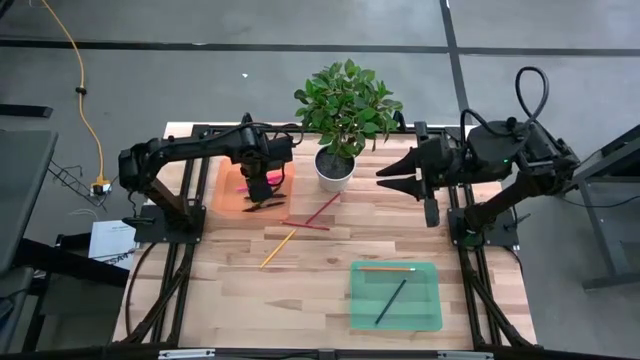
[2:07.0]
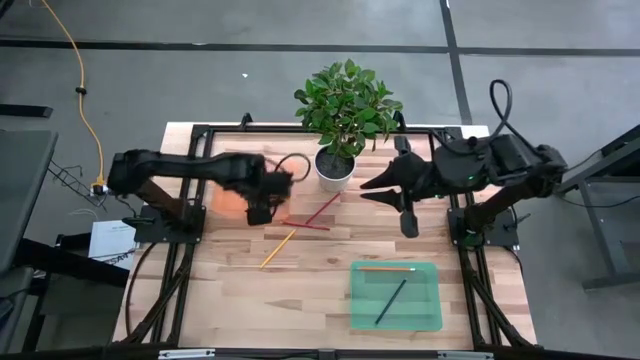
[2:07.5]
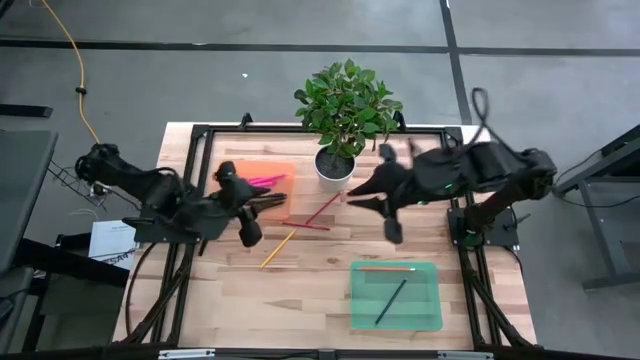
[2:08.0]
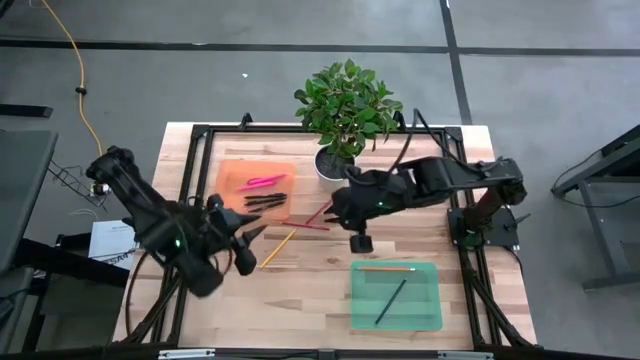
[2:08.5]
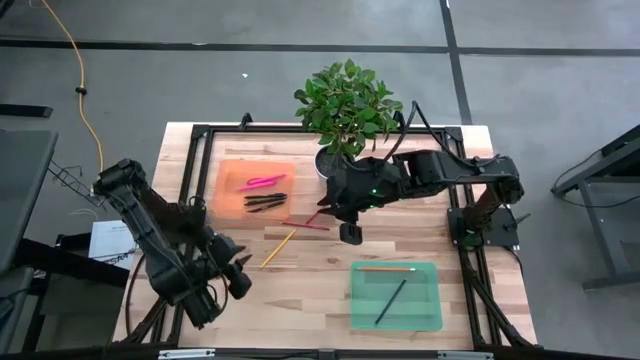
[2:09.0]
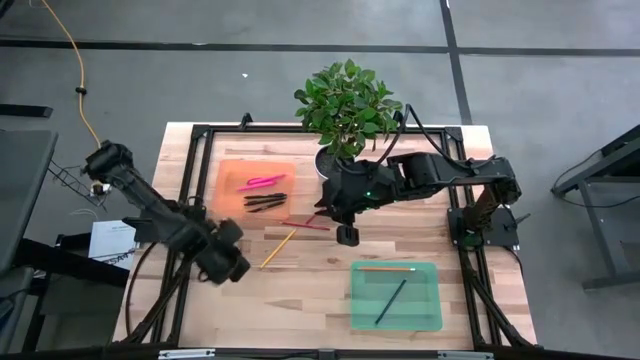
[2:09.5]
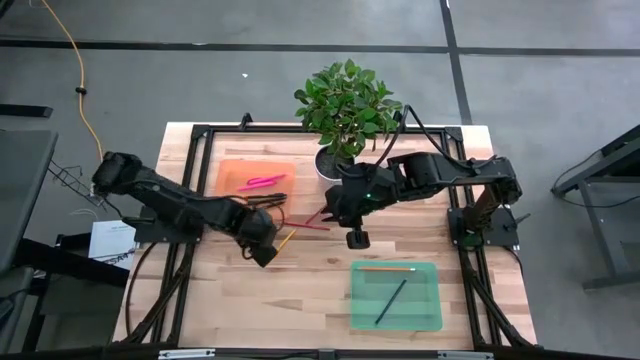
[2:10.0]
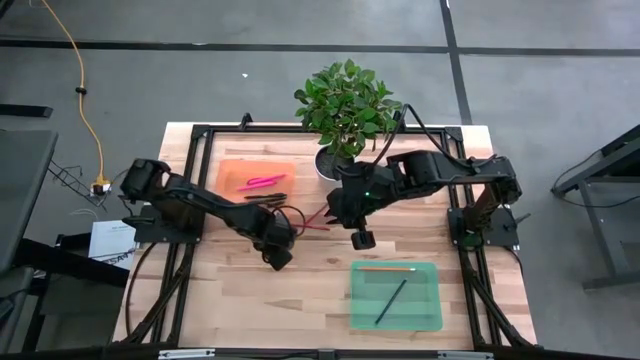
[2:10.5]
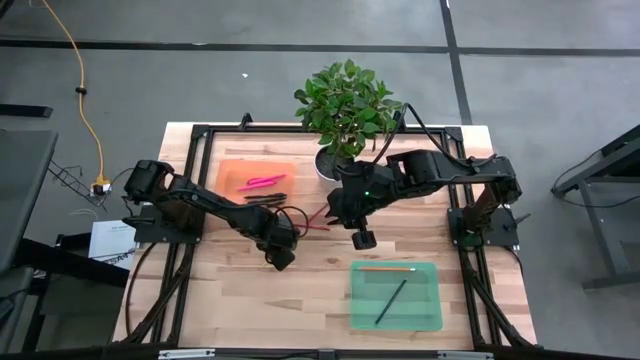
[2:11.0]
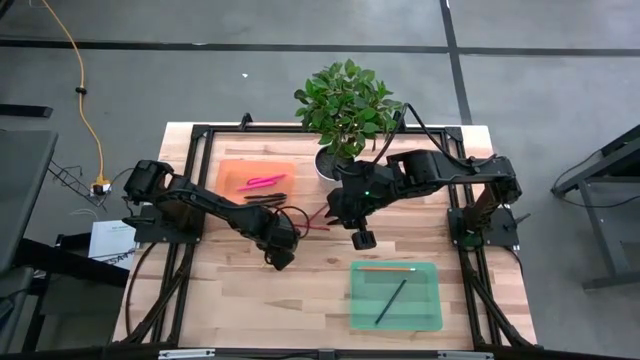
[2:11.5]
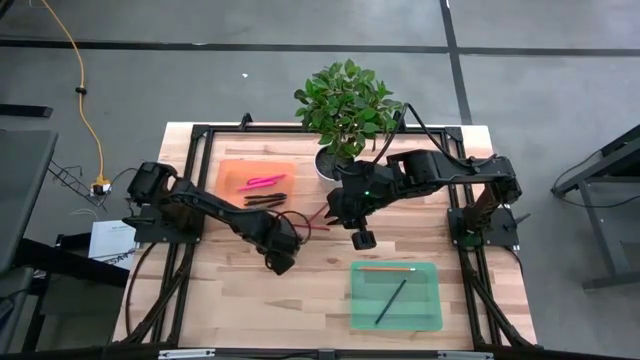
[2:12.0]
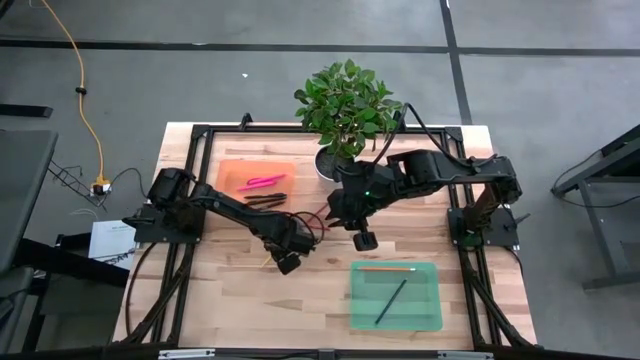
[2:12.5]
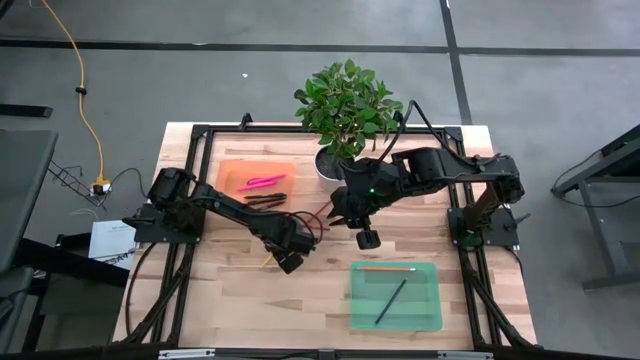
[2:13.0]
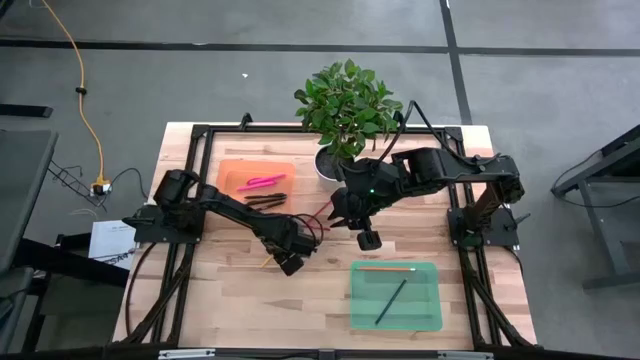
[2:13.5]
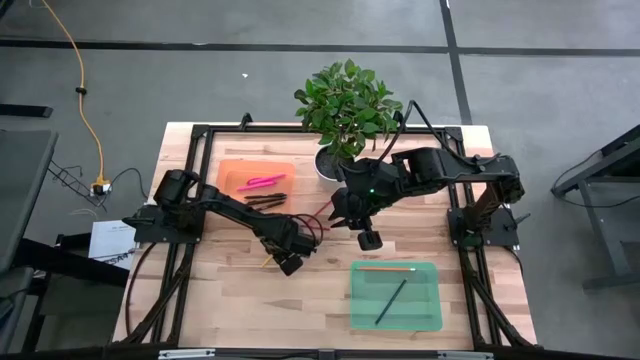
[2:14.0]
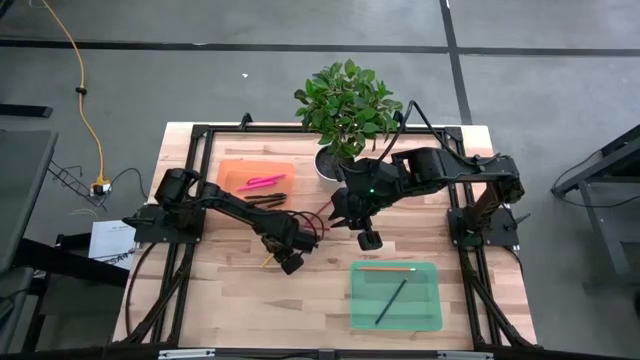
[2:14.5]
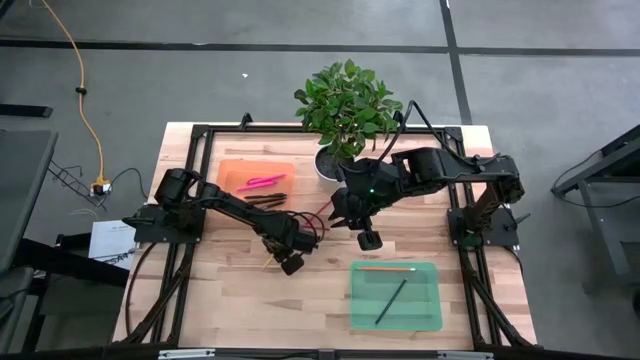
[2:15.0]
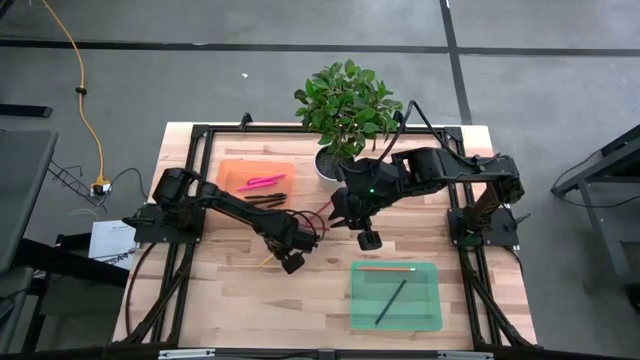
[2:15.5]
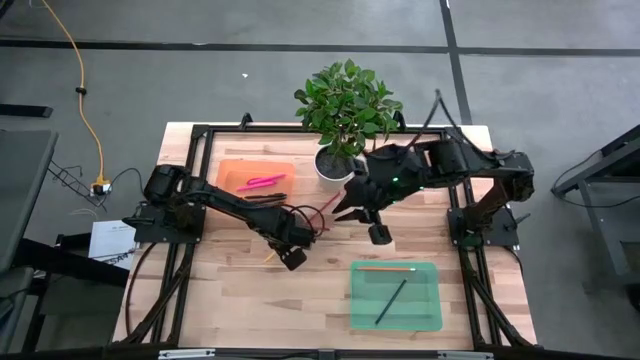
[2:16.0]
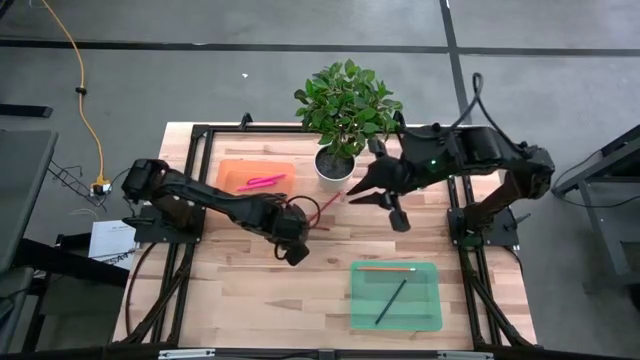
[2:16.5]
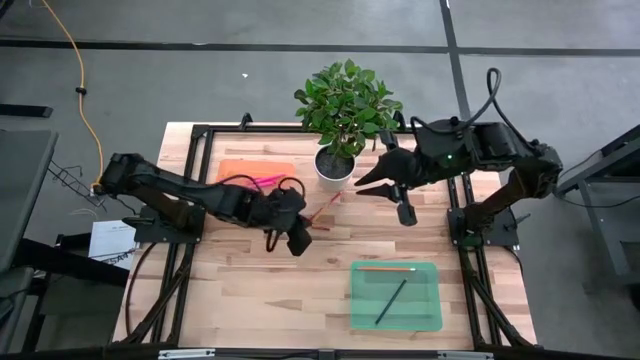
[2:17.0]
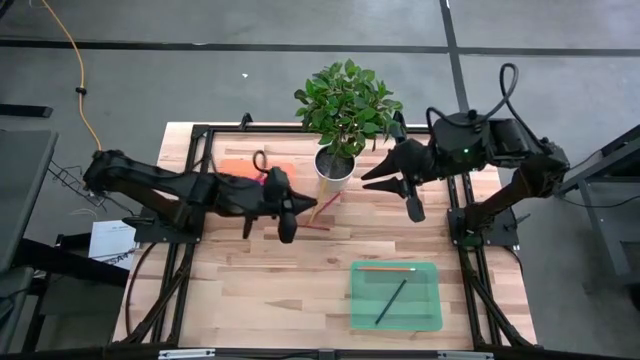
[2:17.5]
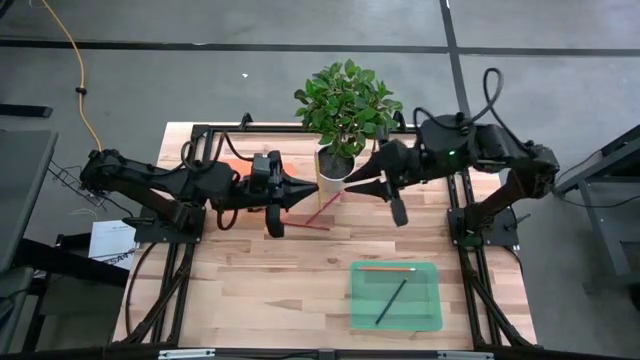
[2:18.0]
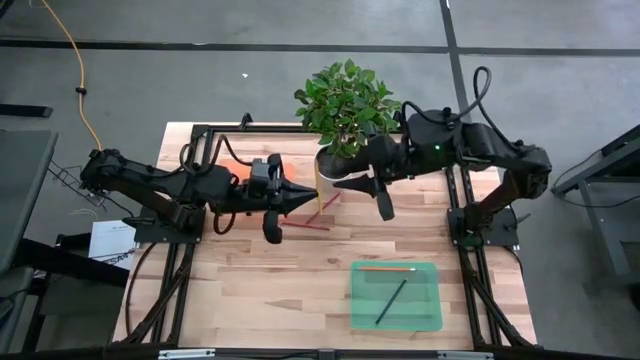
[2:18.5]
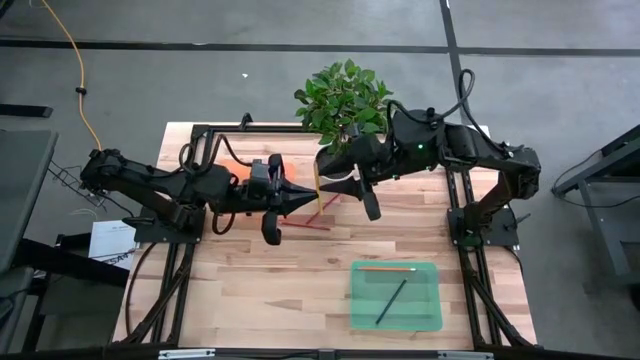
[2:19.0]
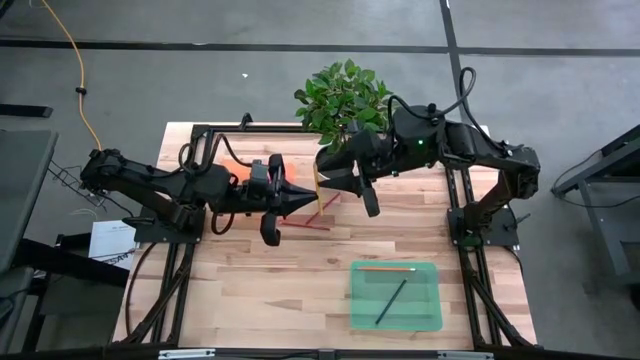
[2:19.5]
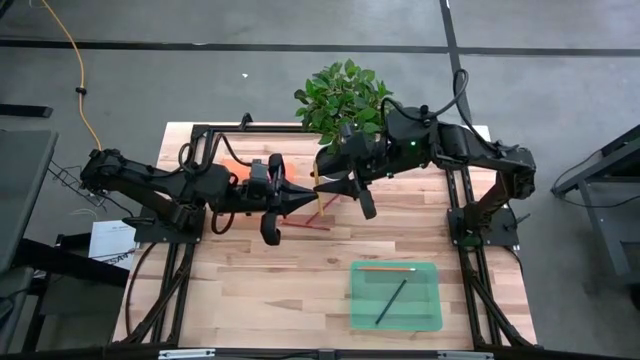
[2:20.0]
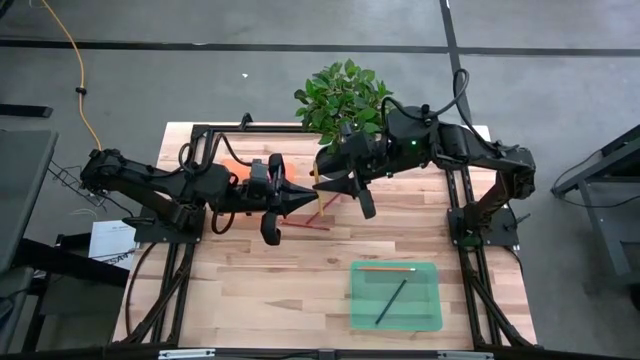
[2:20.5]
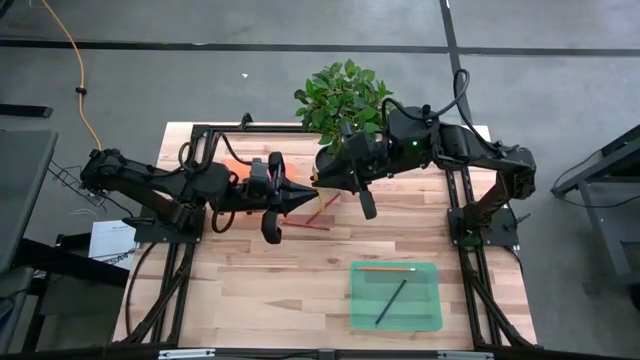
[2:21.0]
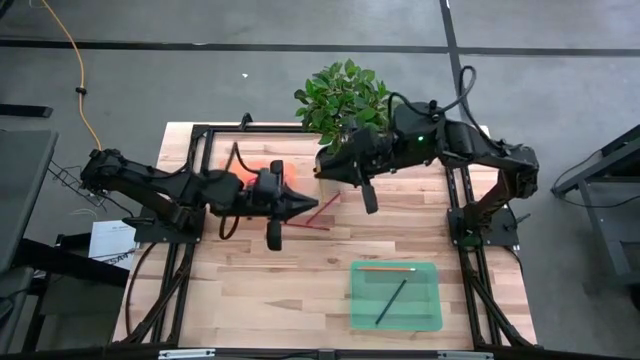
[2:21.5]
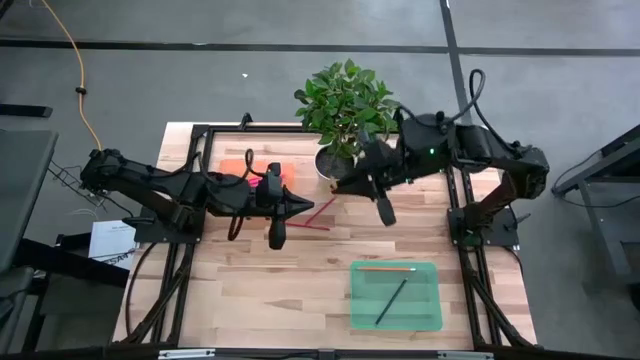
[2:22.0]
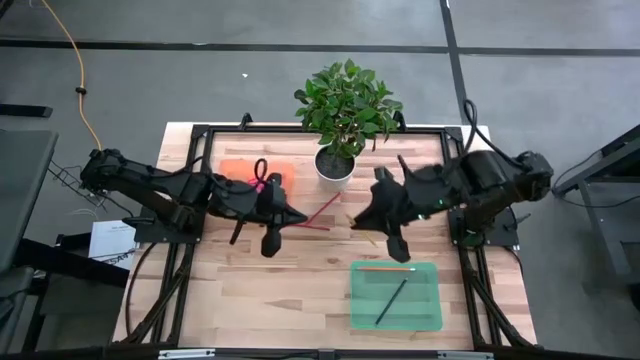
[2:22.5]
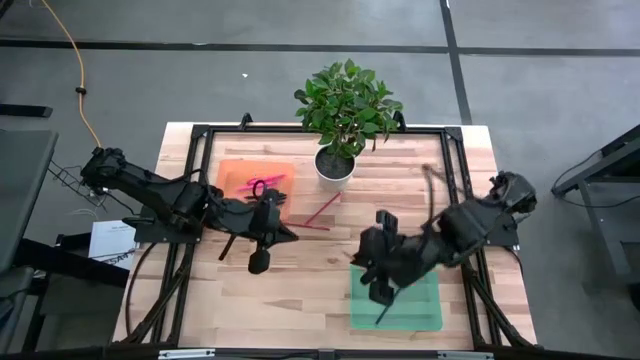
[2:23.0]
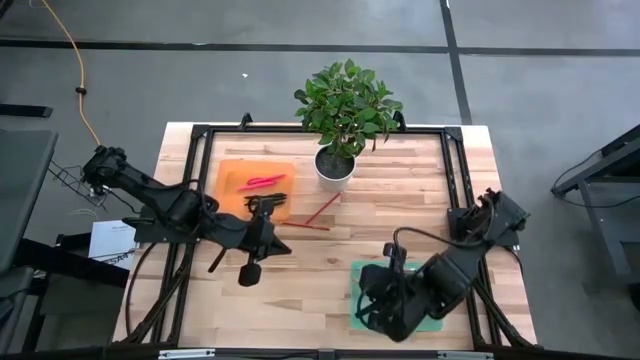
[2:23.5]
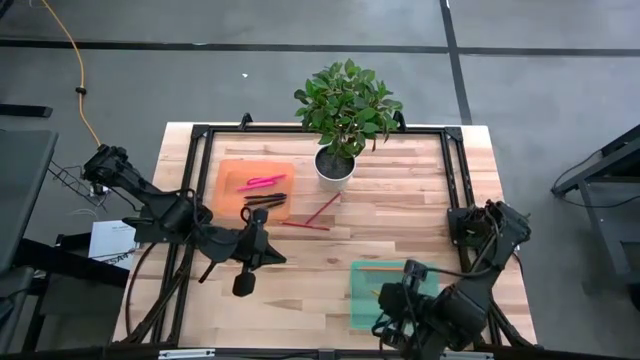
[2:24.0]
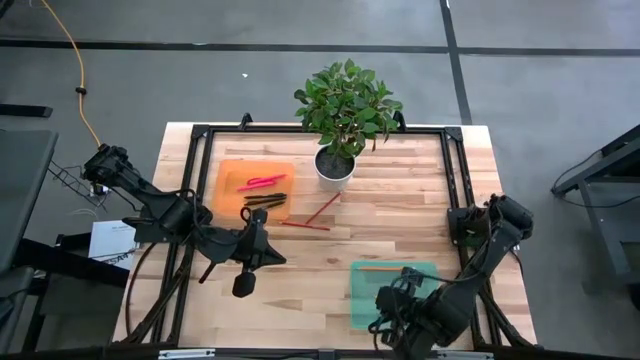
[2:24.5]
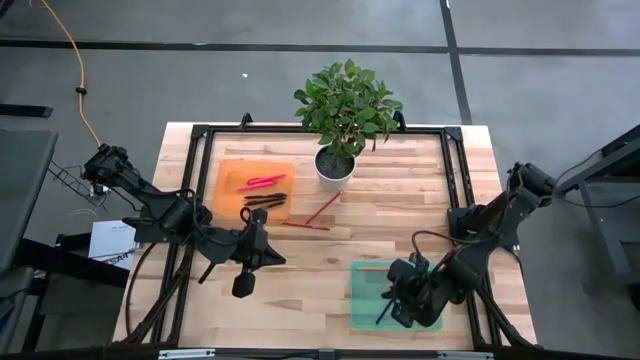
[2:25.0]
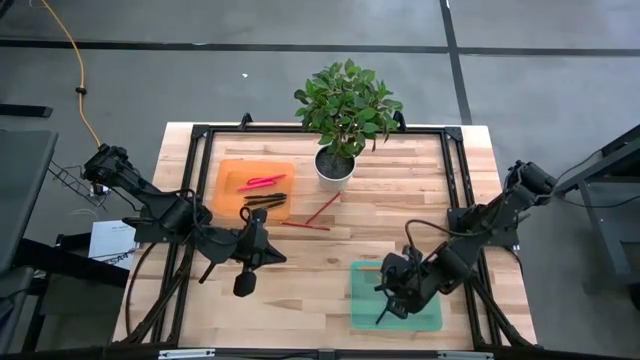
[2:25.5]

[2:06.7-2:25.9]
Task: Sort pens & pencils
Put the yellow colored pencil into the green bin
